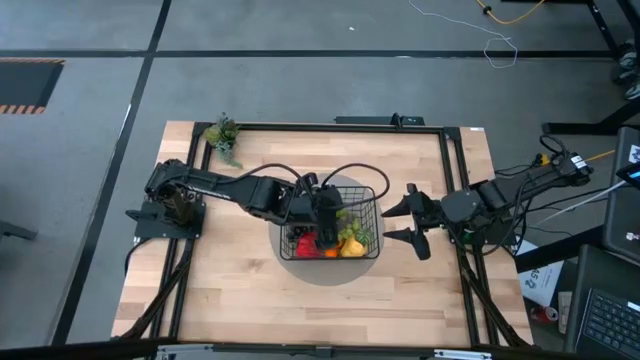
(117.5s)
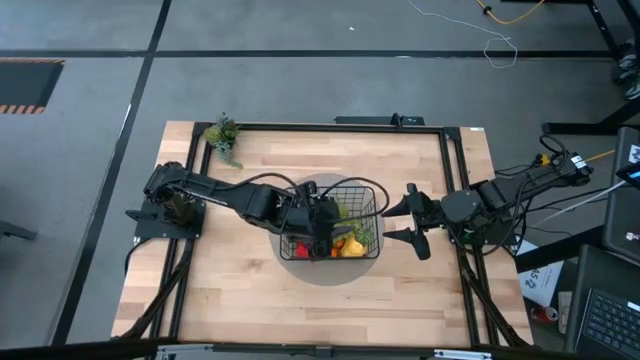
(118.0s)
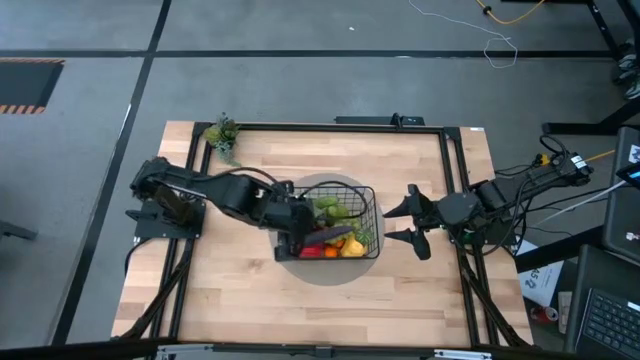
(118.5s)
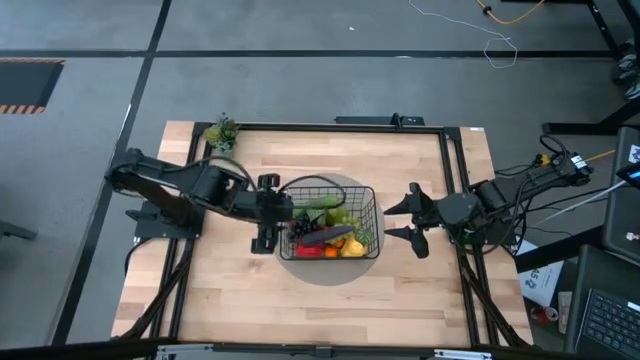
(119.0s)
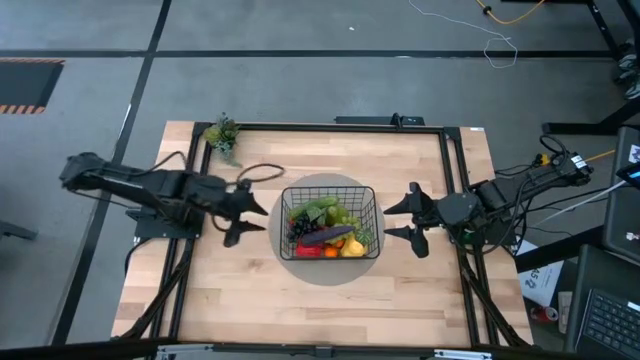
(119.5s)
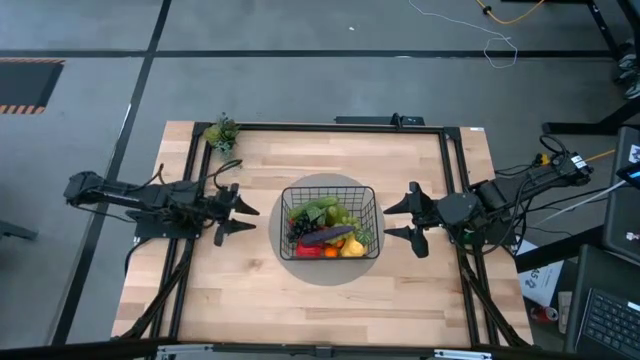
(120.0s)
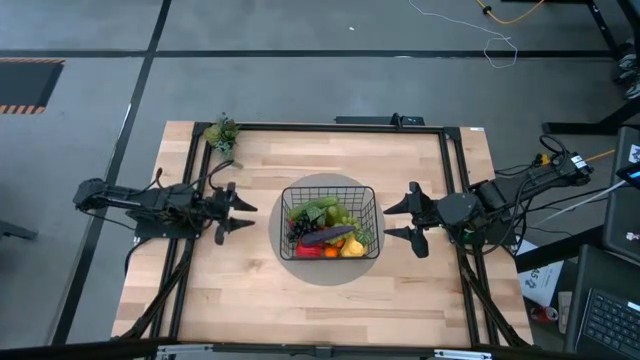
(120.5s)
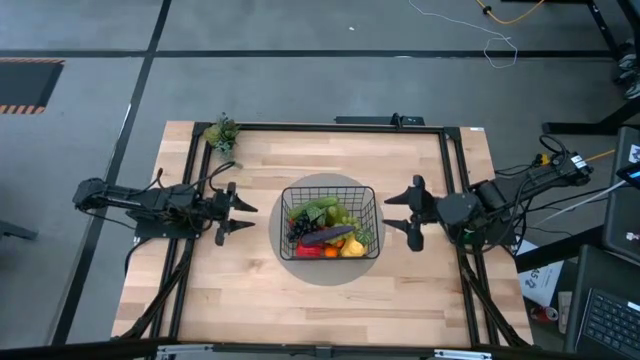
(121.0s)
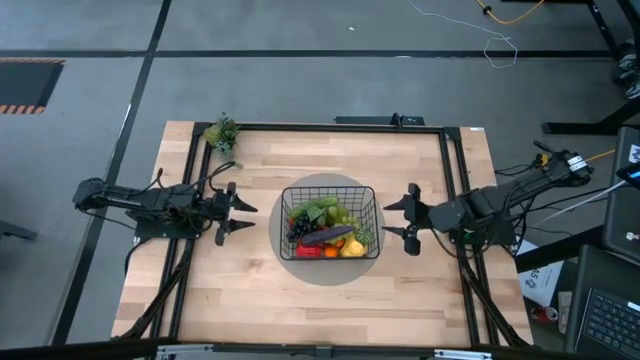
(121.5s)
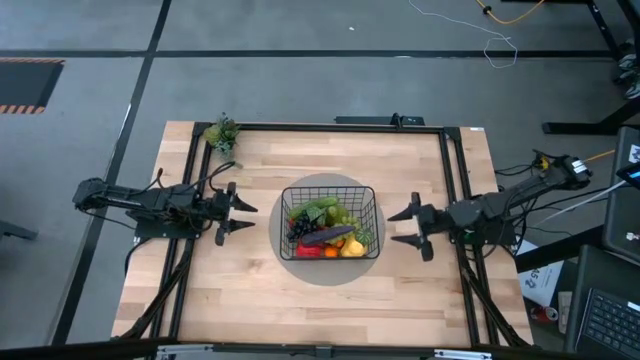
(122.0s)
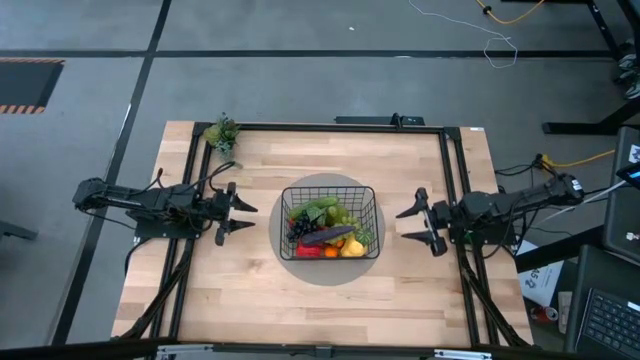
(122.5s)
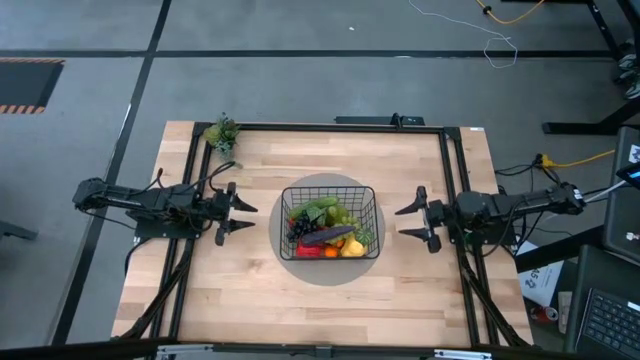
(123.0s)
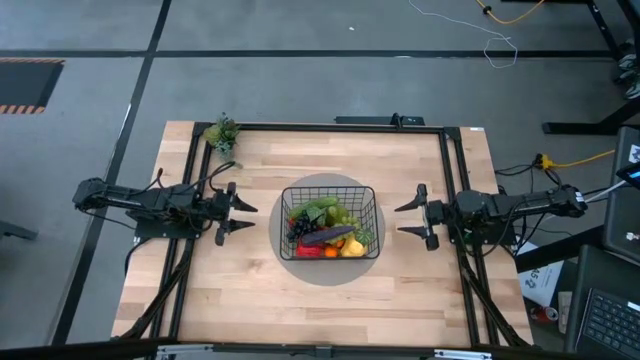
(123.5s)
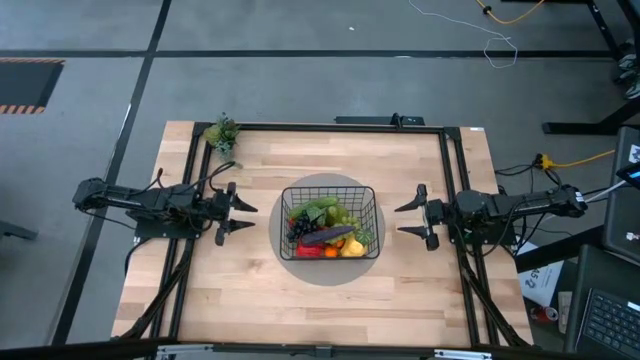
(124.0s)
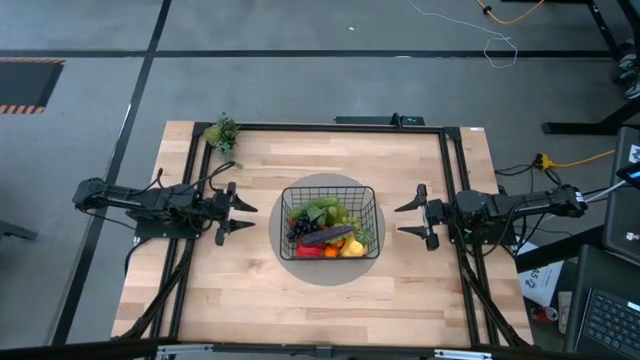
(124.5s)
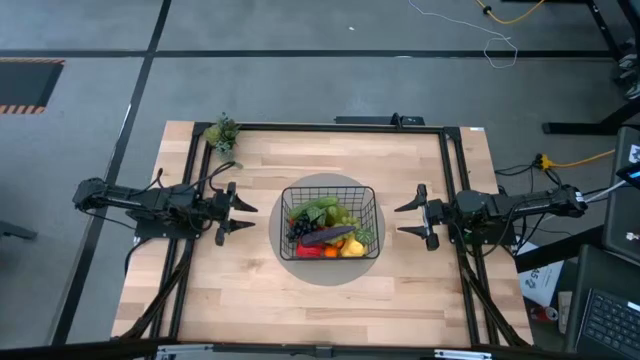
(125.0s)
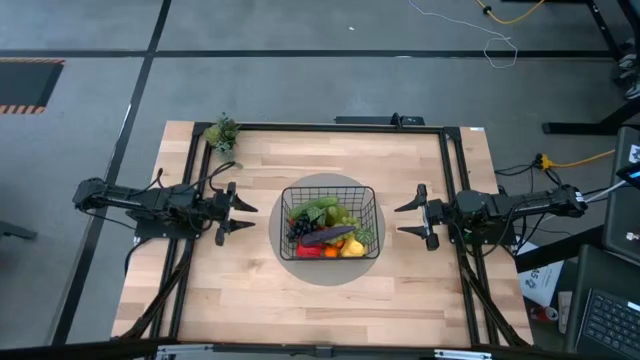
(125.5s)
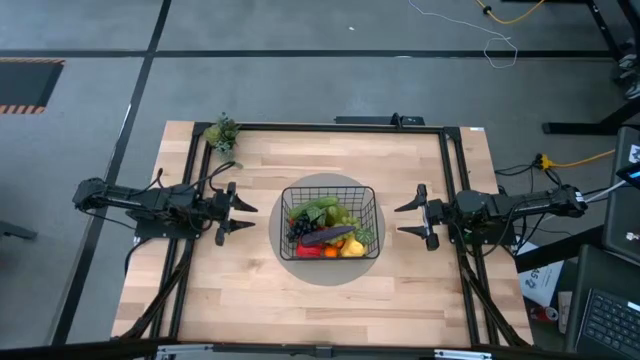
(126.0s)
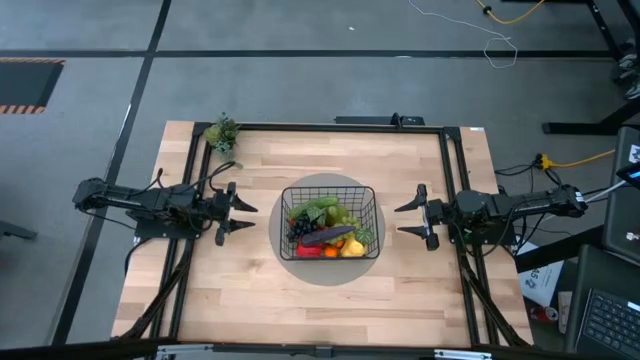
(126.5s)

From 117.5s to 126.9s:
Task: Build produce basket
Return to Home Position

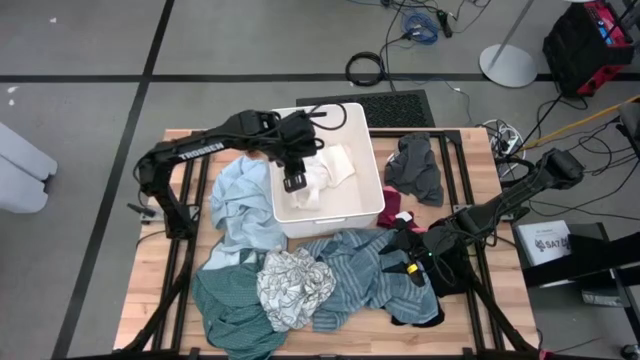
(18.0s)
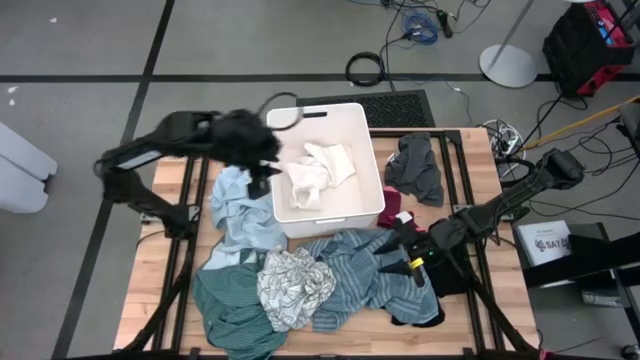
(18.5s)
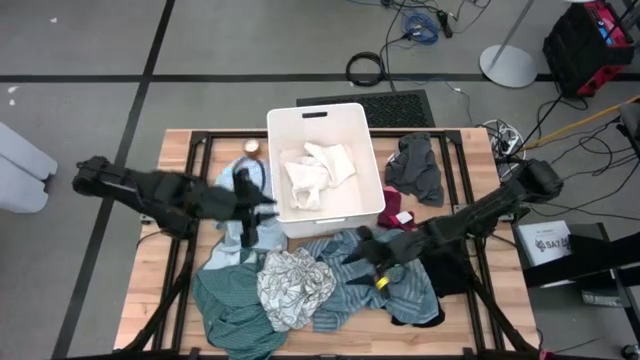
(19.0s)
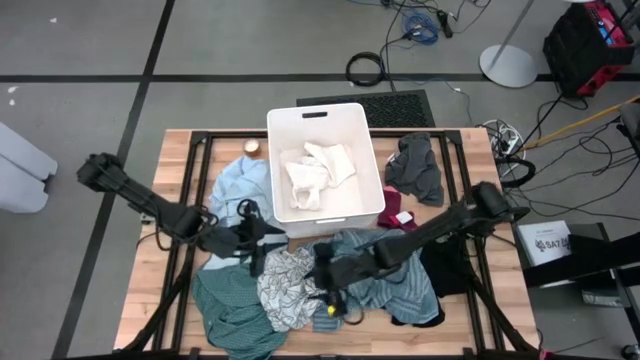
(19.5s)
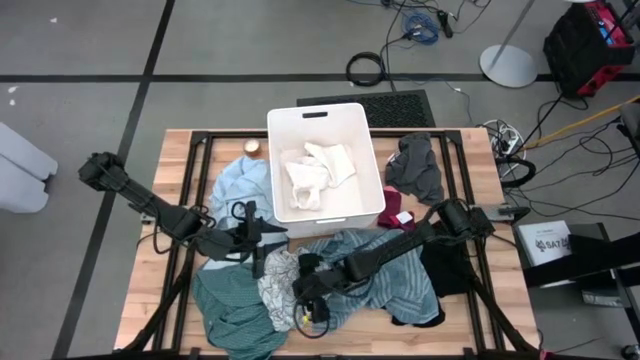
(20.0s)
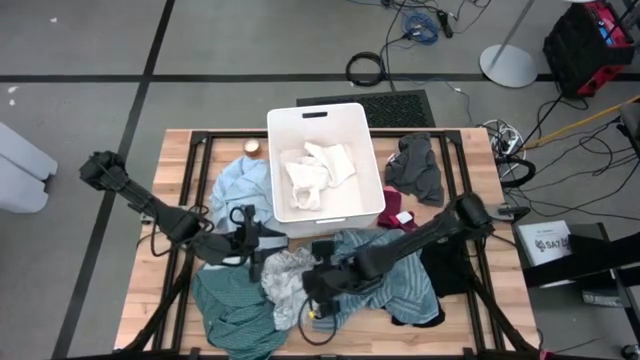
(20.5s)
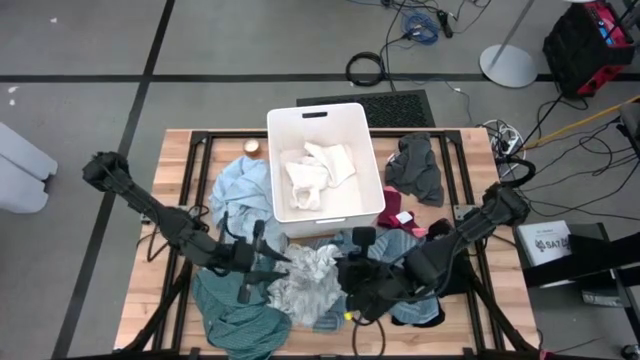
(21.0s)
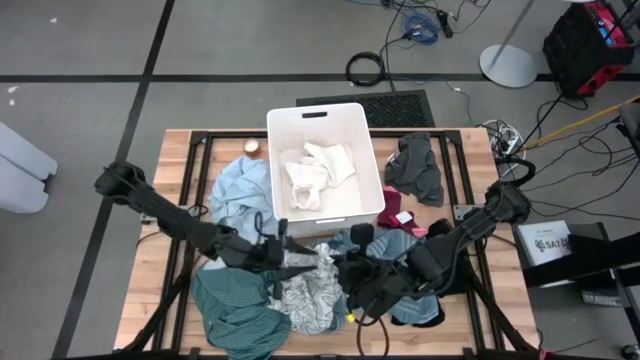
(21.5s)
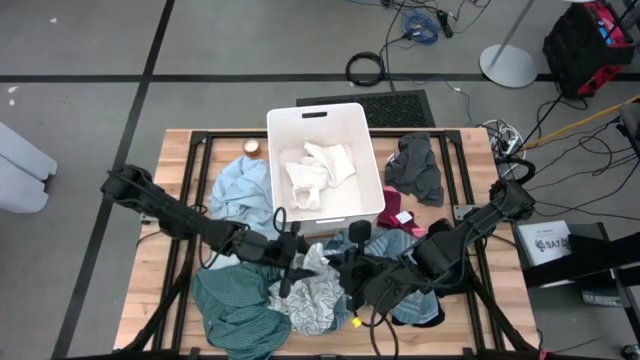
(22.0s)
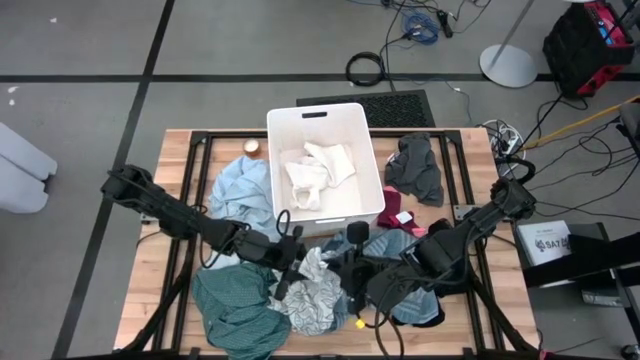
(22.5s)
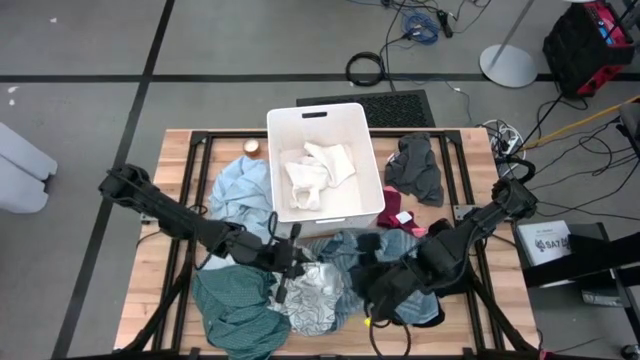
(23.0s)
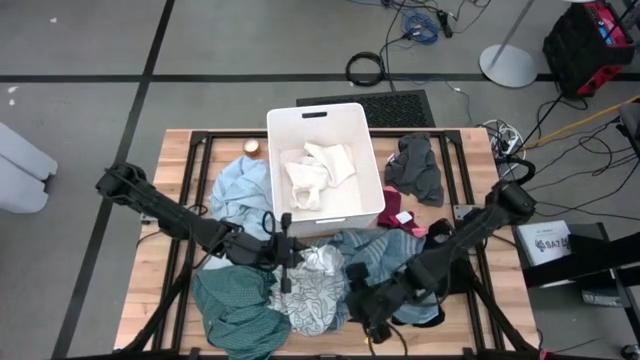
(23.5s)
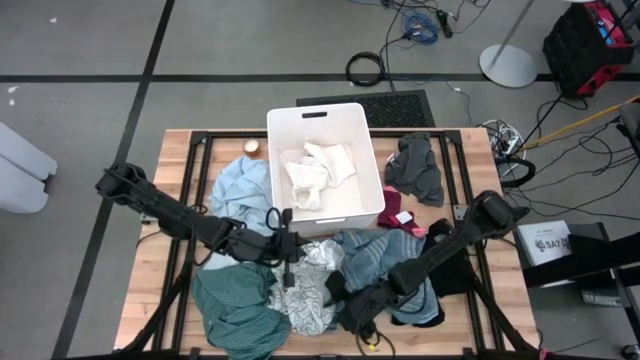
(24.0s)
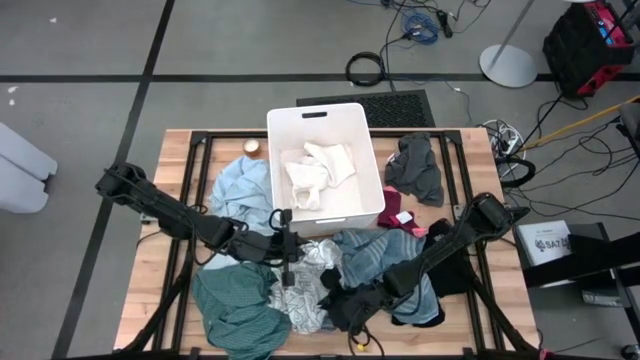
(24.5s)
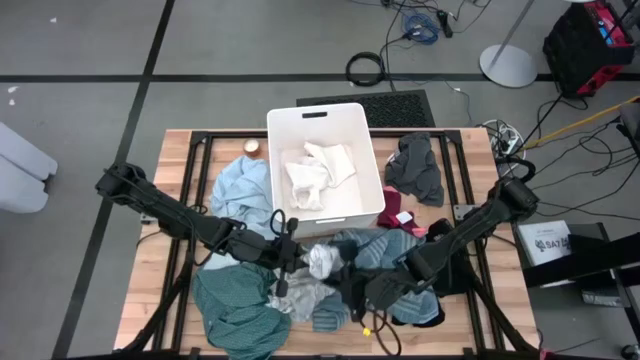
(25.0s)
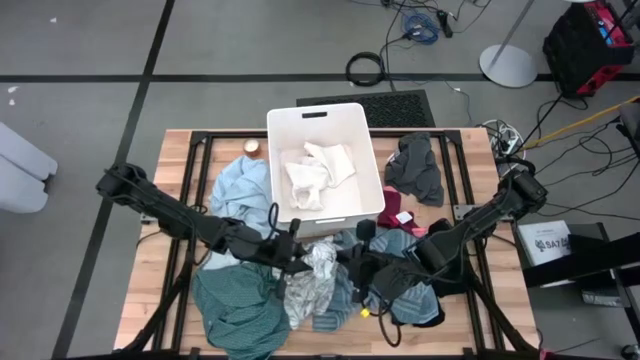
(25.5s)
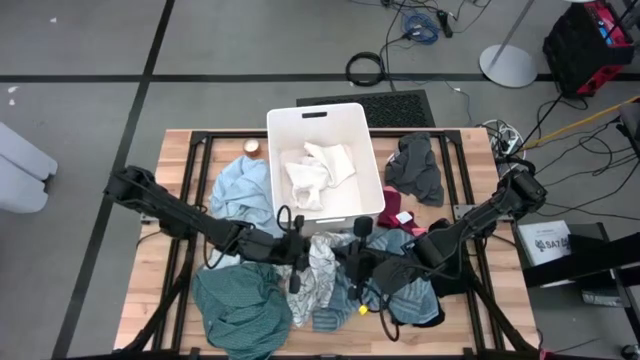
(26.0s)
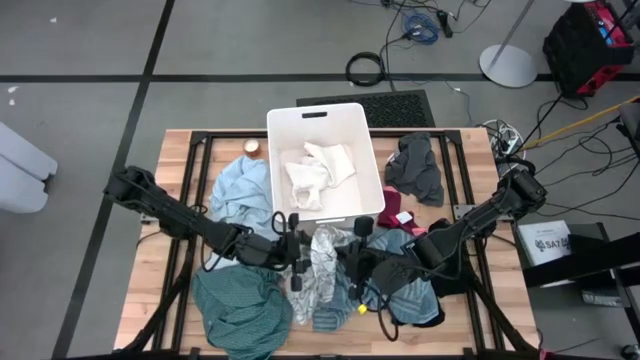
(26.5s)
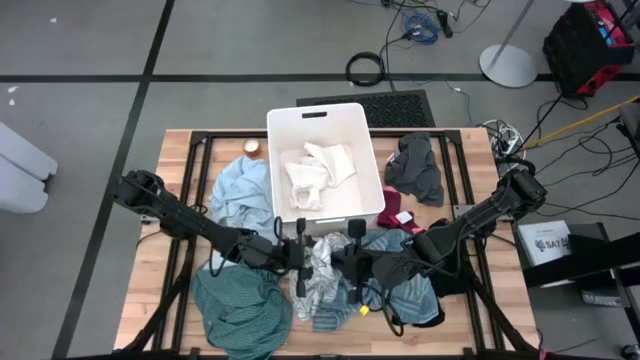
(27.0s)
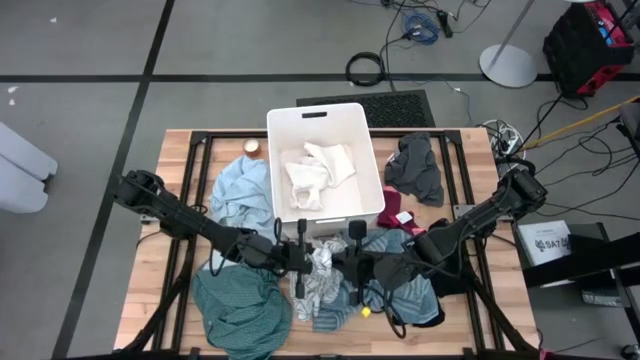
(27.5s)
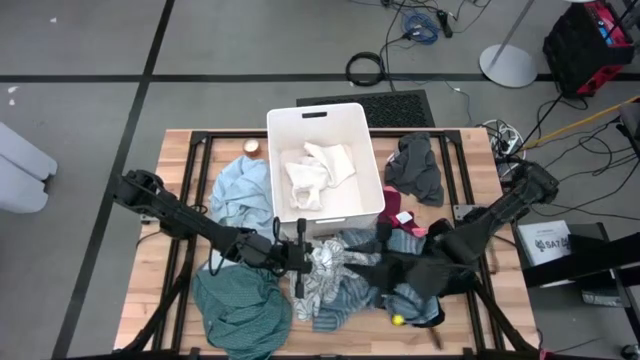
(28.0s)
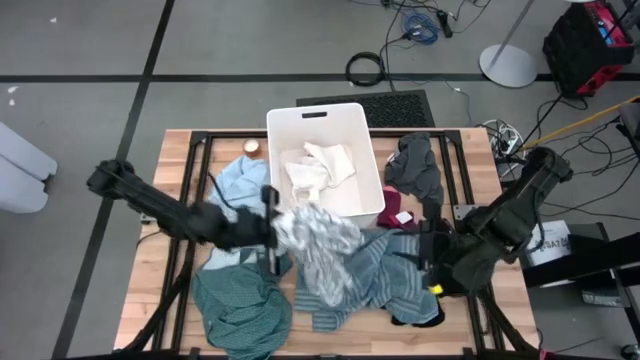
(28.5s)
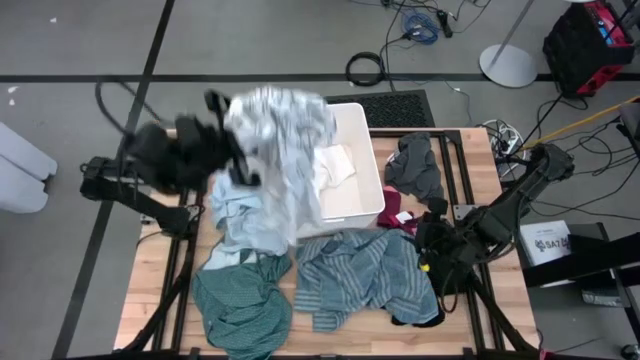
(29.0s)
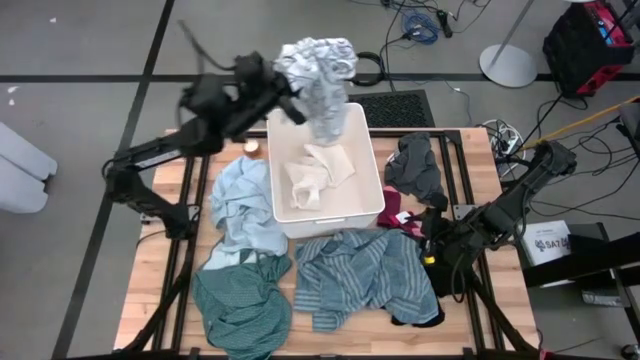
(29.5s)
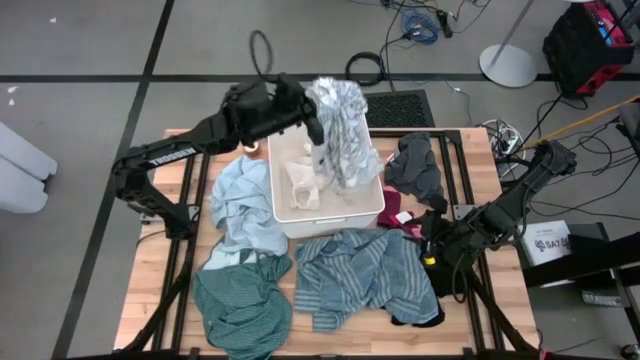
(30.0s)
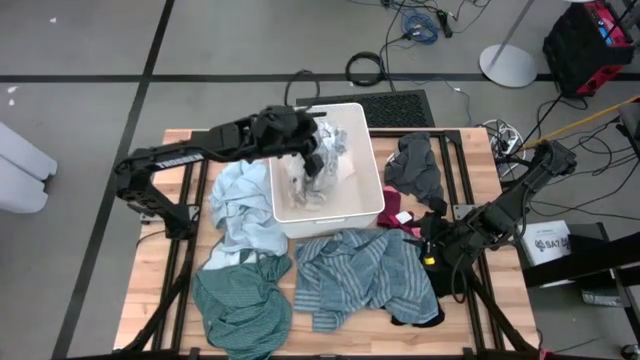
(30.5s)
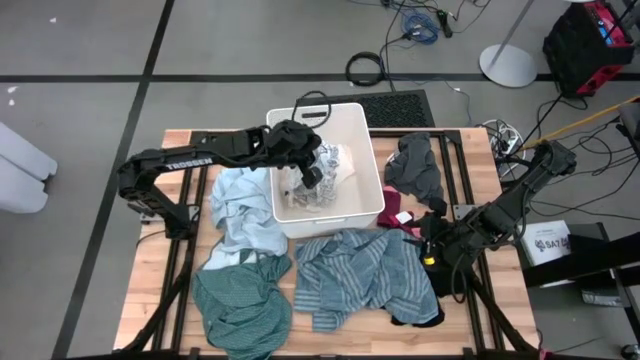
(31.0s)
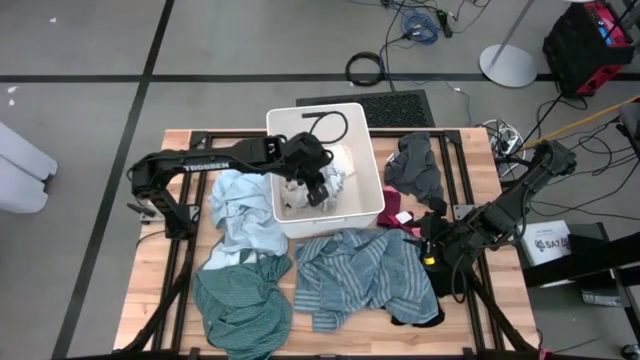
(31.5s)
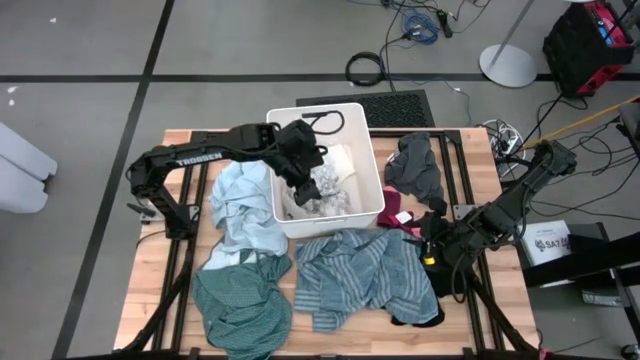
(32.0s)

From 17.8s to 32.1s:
Task: Sort clothes
Put the white shirt into the white laundry bin
